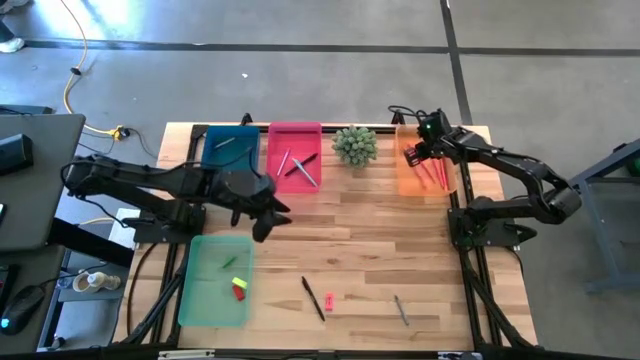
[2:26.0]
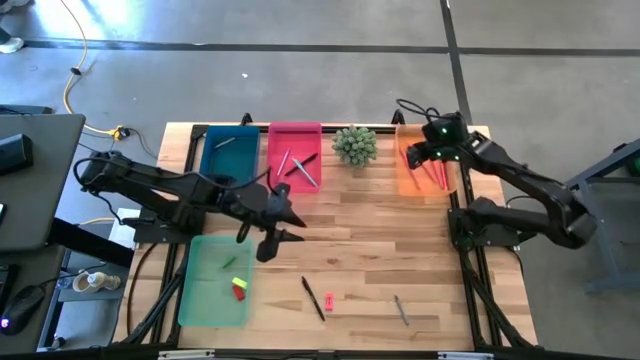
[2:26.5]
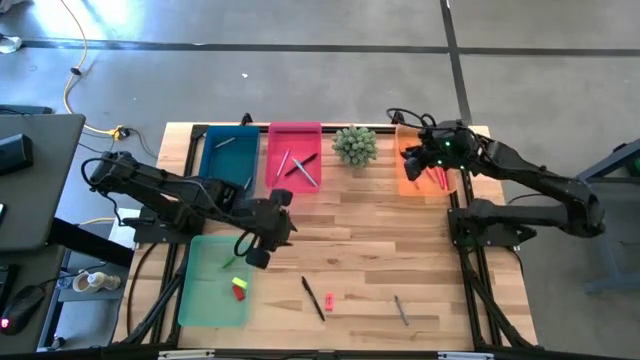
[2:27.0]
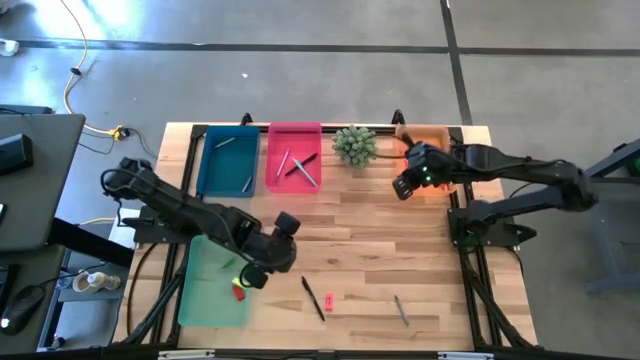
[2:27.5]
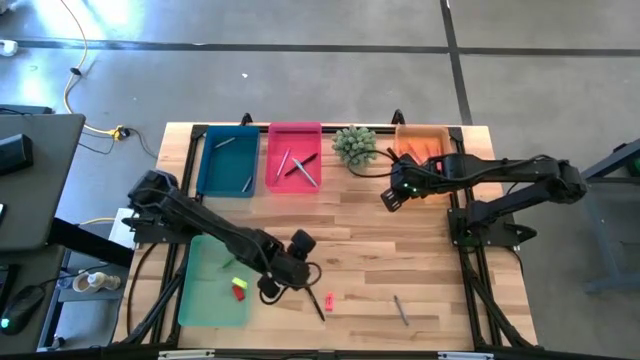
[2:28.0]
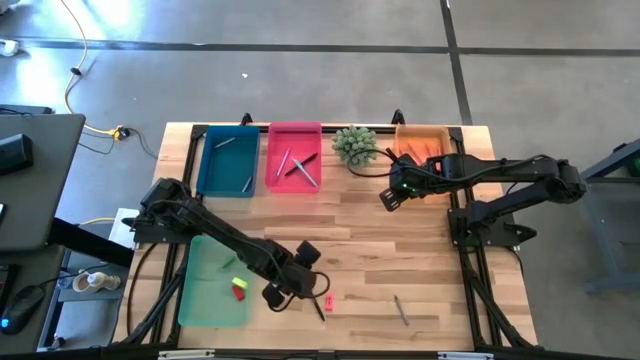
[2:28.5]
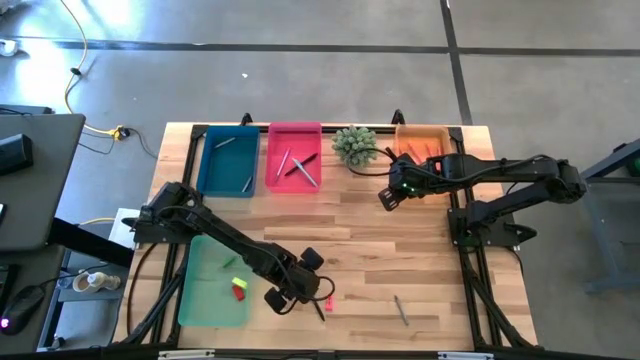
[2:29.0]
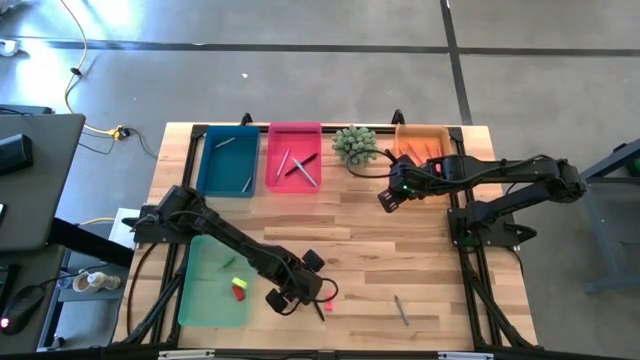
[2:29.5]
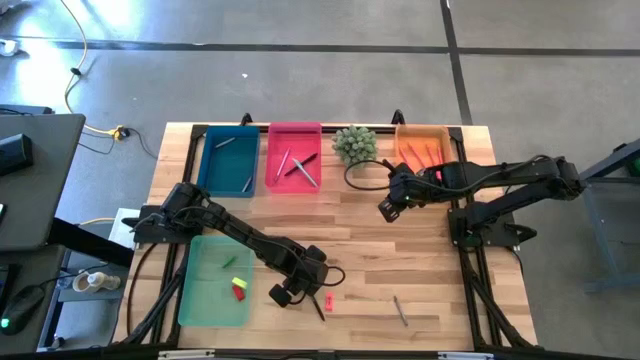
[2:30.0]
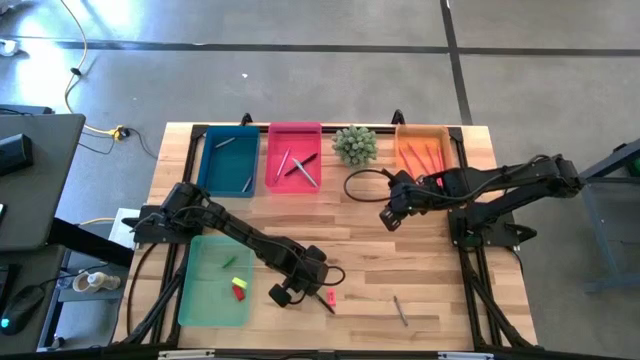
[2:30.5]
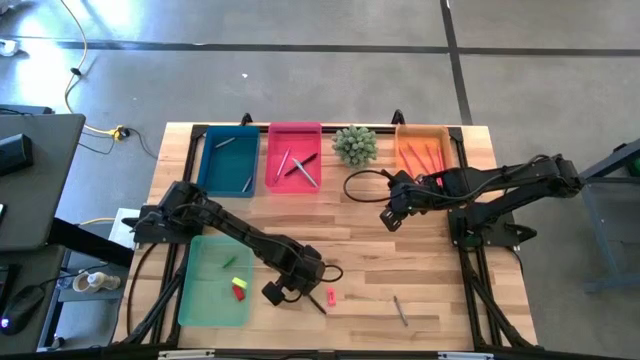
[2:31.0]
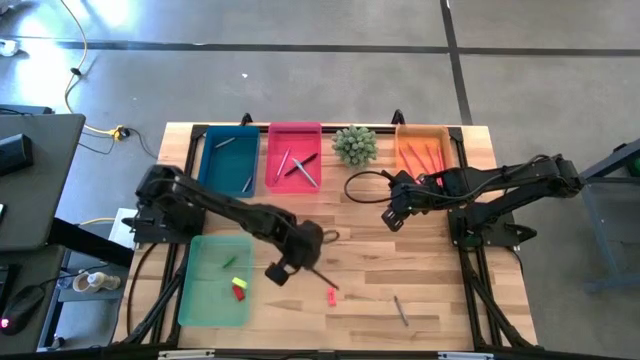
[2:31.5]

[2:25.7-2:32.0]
Task: Sort crayons/erasers/pens/pencils in bins
Put the black pen into the pink bin

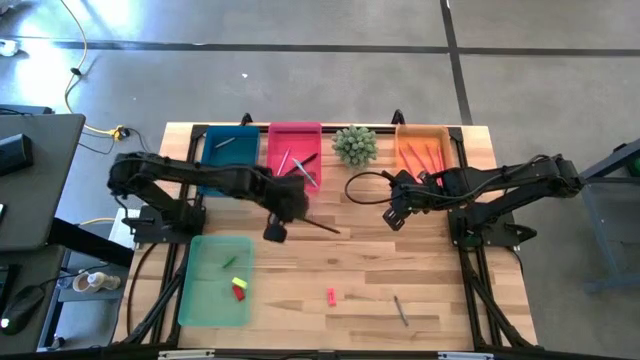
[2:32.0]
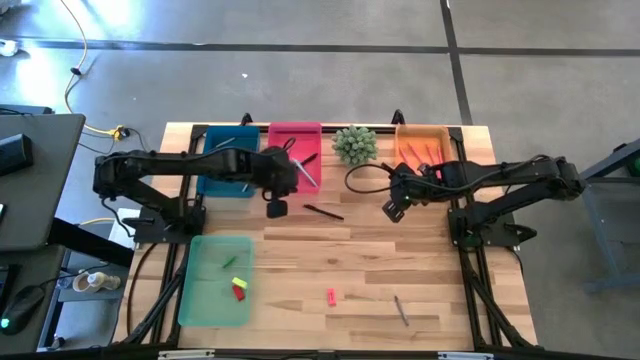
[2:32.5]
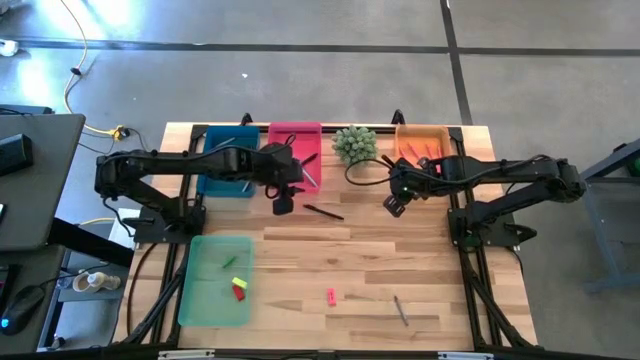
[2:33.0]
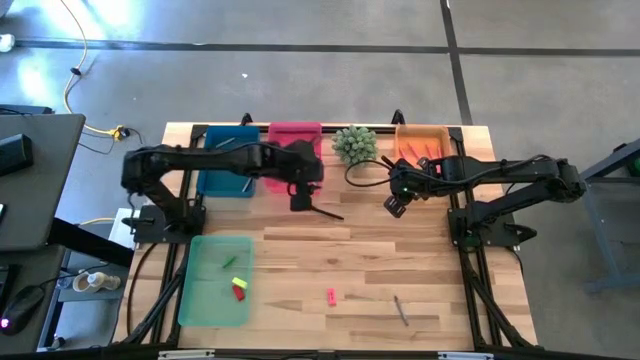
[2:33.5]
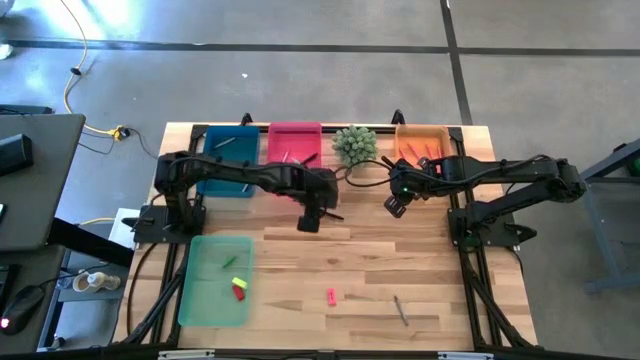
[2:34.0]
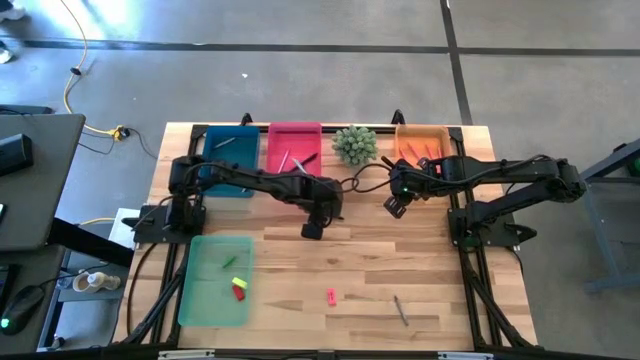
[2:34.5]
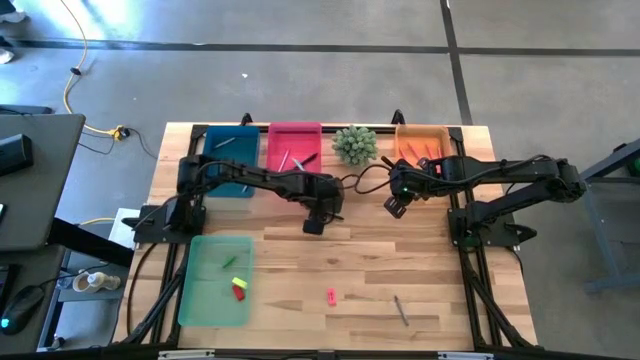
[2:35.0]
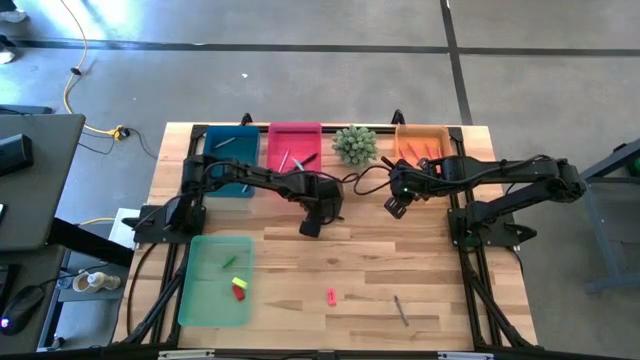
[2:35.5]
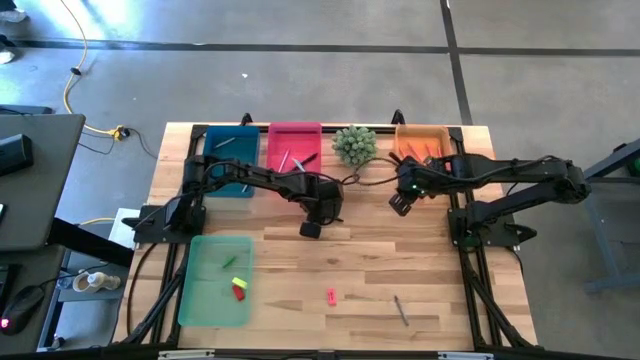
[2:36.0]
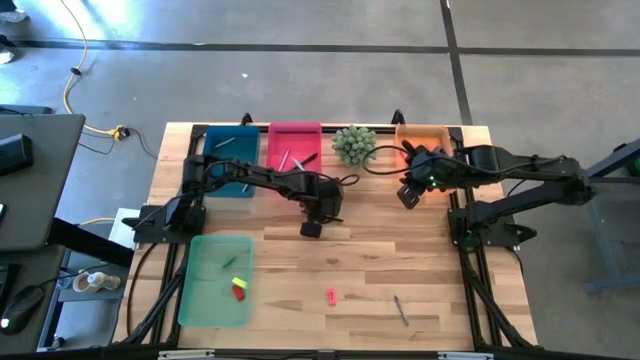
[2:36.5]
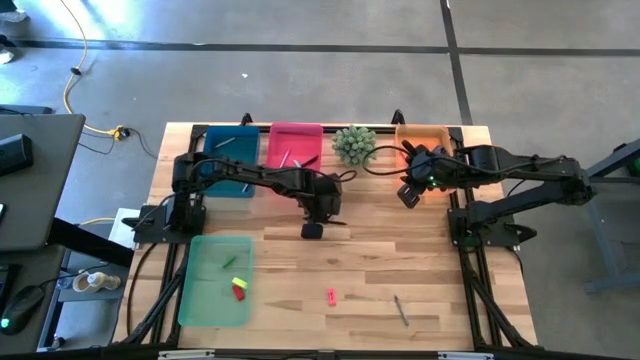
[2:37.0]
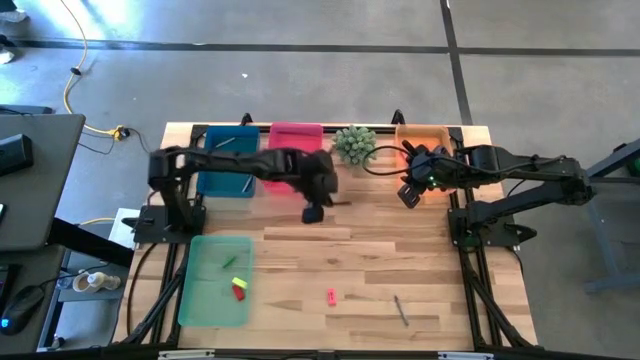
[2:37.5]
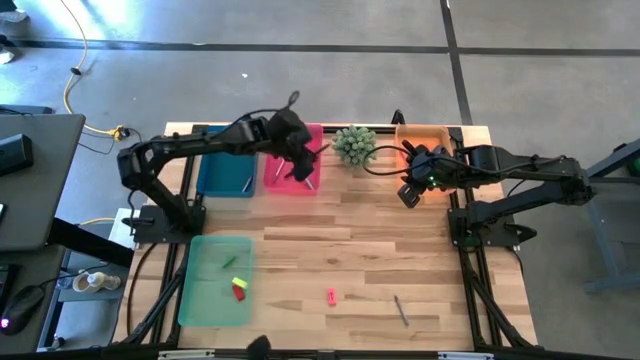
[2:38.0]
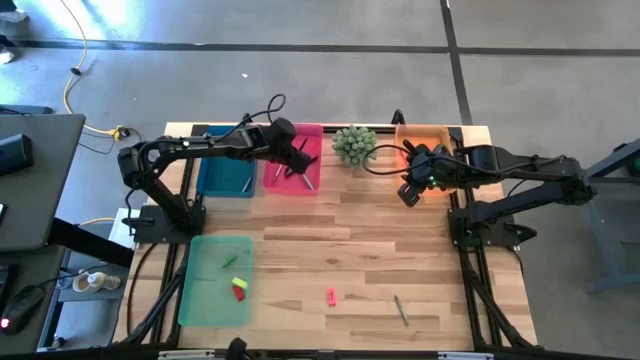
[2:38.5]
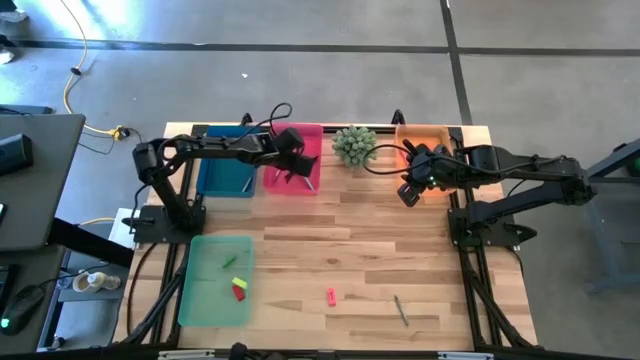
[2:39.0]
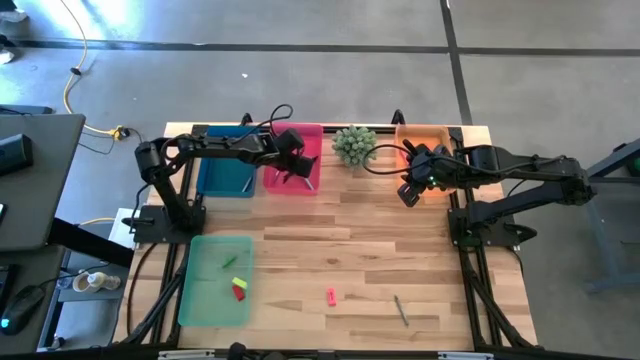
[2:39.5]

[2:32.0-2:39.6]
Put the black pen into the pink bin

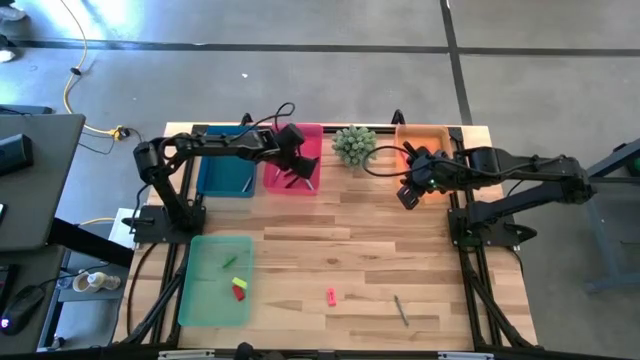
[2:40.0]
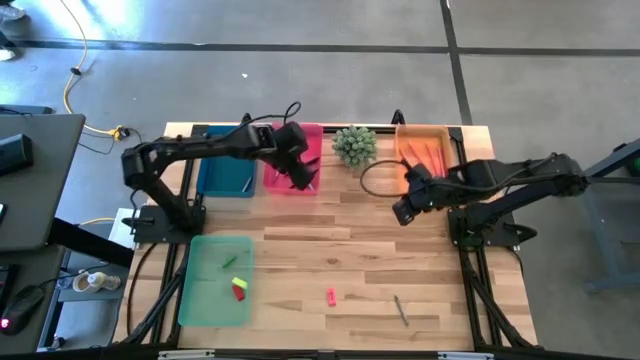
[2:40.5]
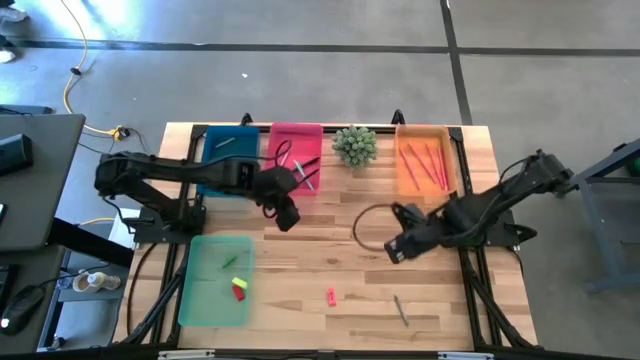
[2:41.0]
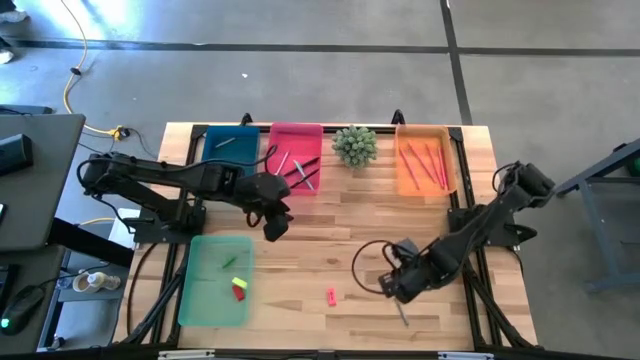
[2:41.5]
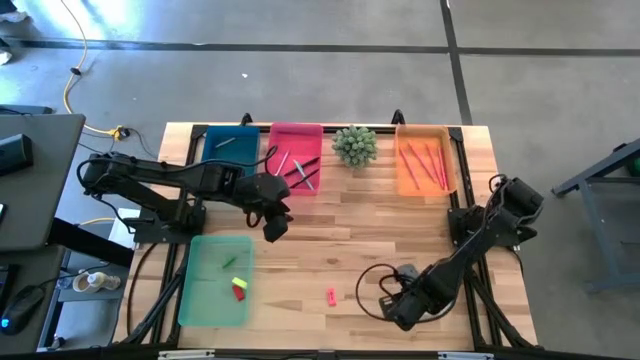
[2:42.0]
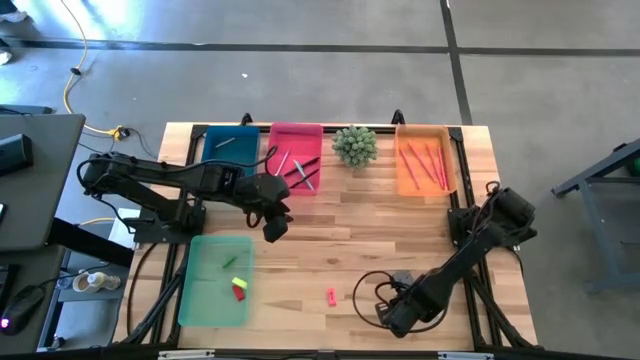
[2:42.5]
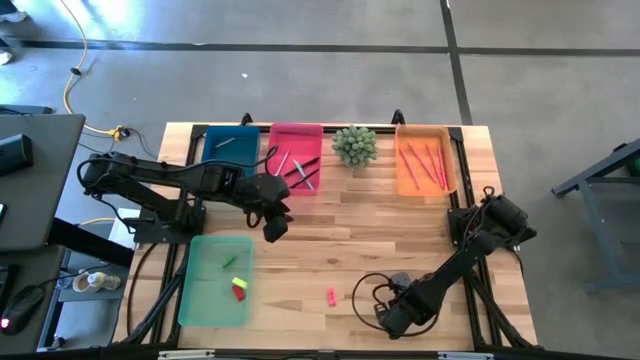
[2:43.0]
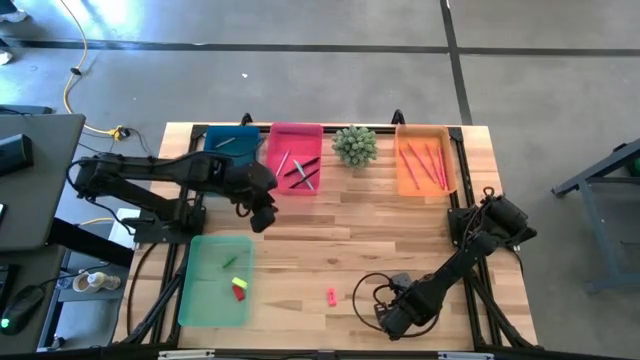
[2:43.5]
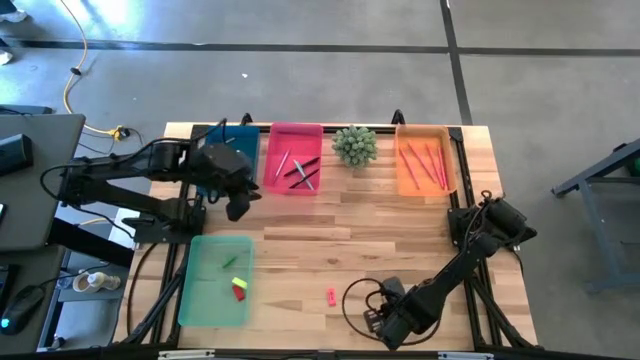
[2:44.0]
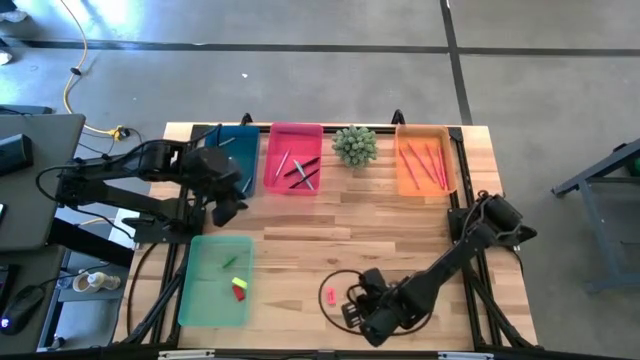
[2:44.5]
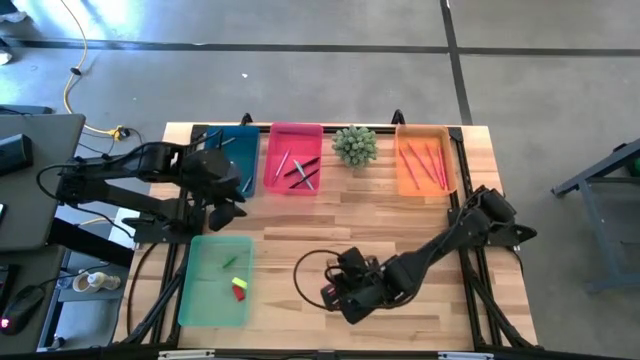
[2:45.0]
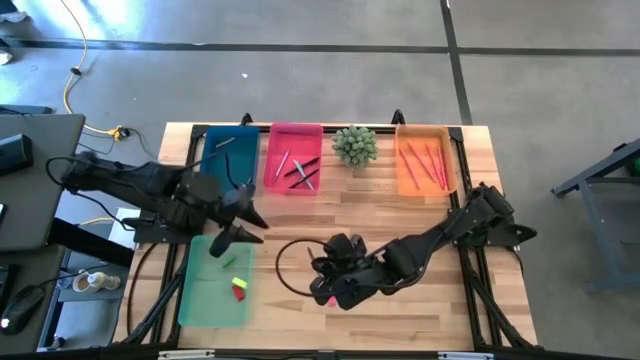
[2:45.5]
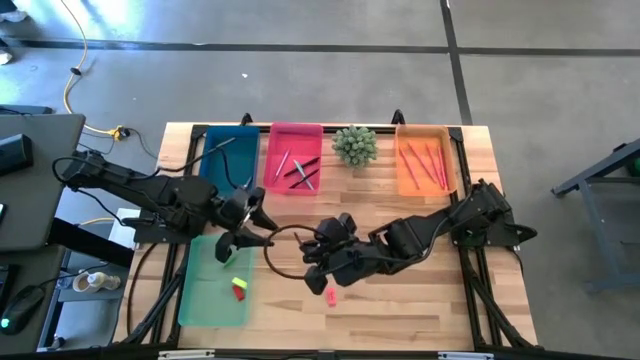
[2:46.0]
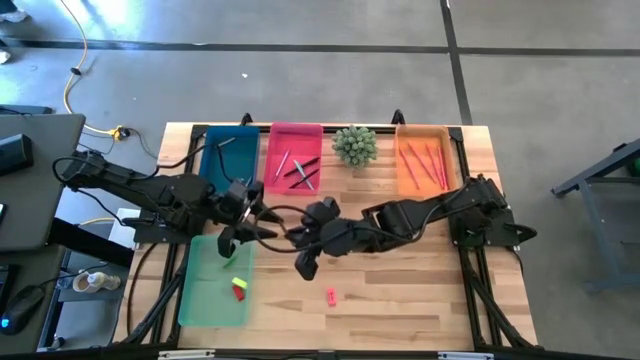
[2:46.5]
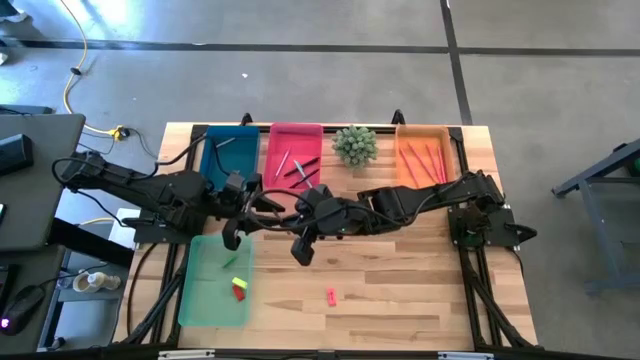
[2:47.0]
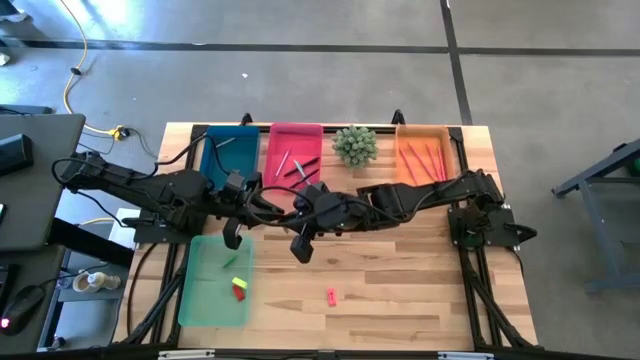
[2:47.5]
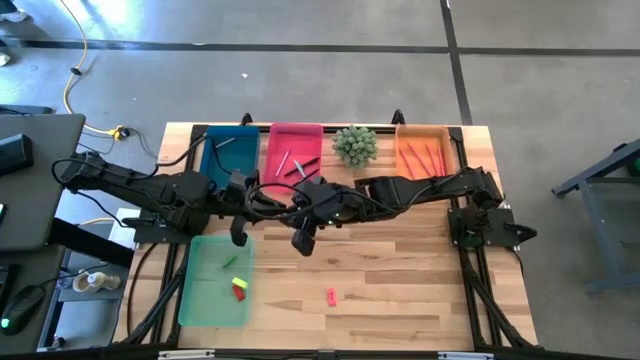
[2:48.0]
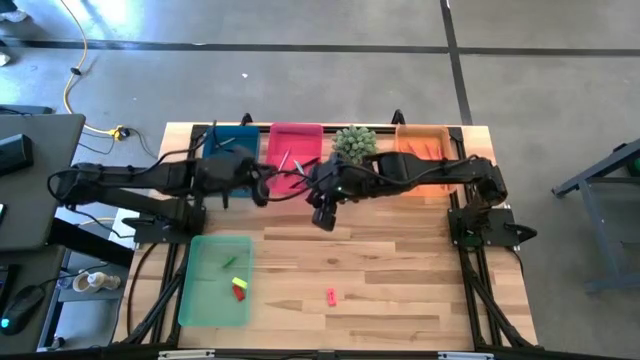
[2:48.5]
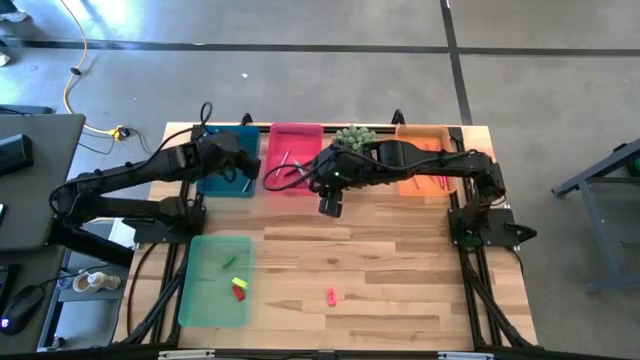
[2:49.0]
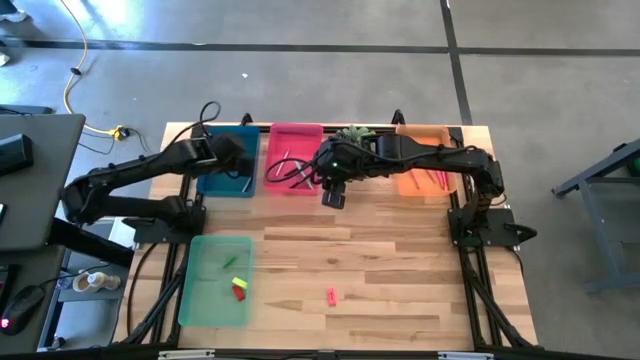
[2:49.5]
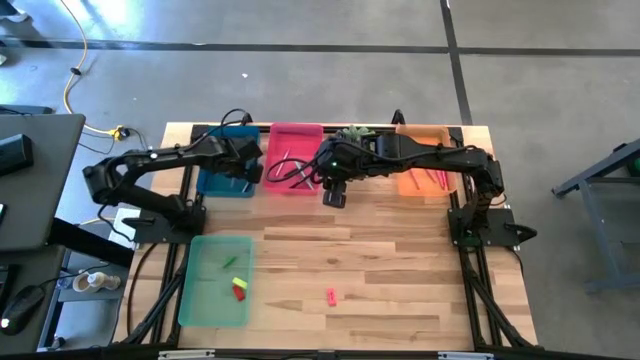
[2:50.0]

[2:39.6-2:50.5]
Put the gray crayon into the blue bin
